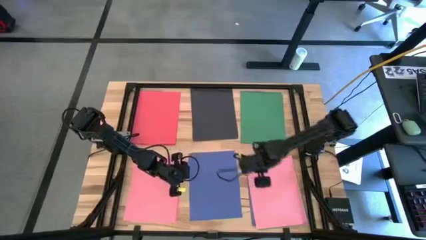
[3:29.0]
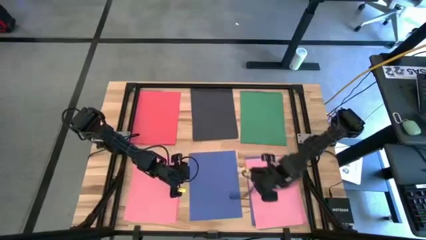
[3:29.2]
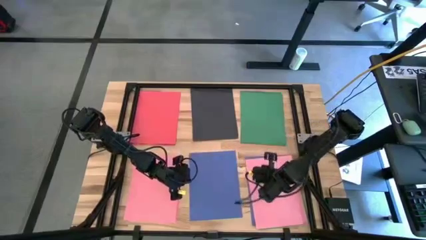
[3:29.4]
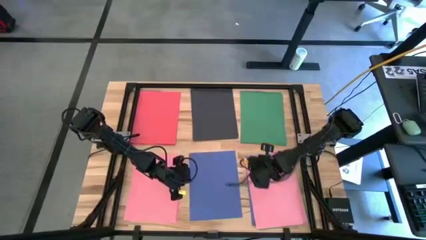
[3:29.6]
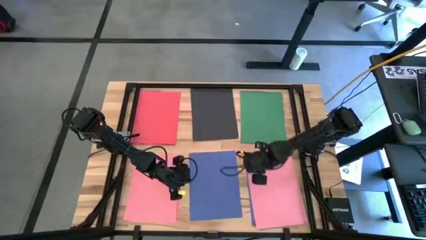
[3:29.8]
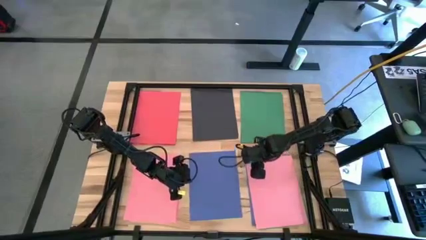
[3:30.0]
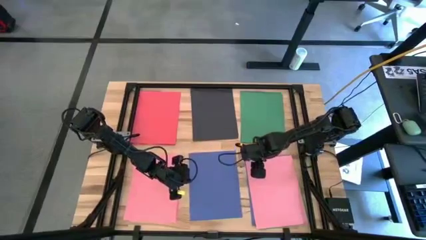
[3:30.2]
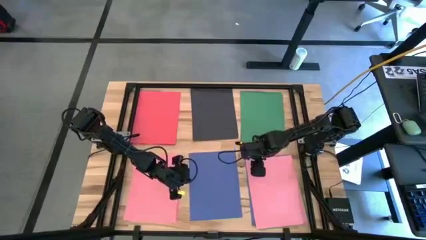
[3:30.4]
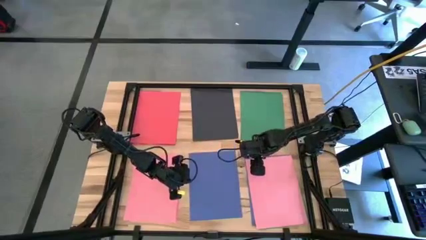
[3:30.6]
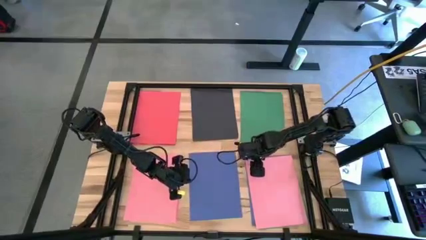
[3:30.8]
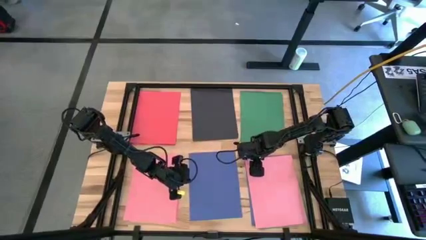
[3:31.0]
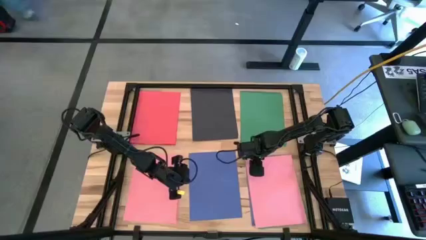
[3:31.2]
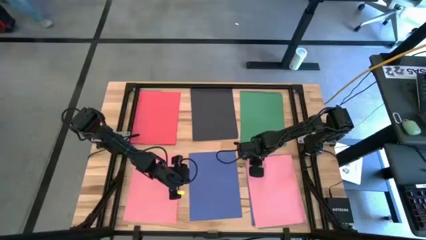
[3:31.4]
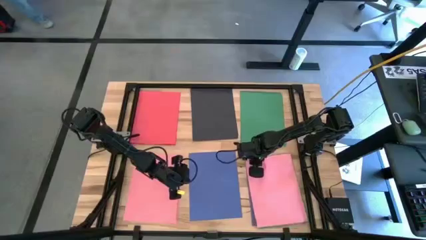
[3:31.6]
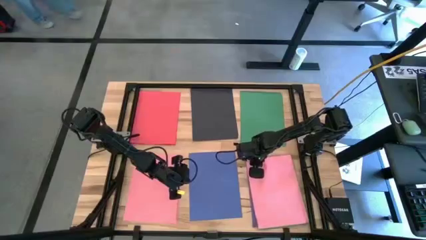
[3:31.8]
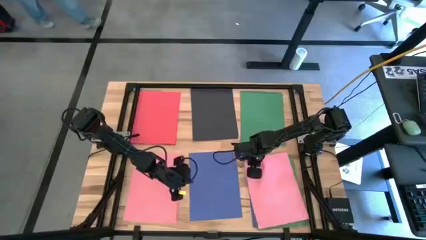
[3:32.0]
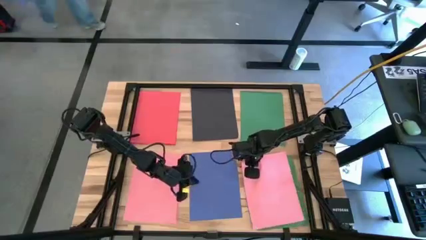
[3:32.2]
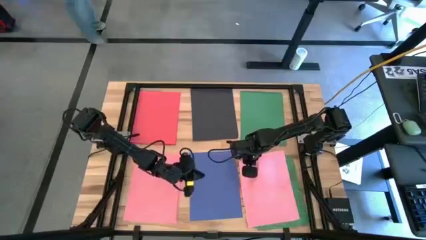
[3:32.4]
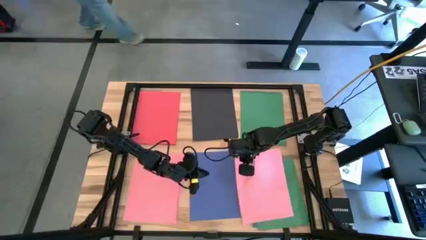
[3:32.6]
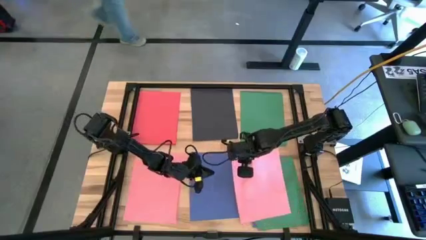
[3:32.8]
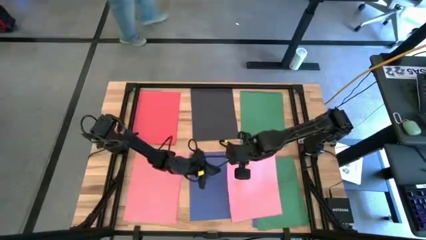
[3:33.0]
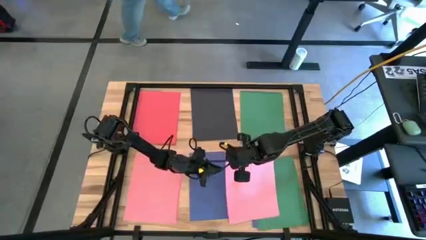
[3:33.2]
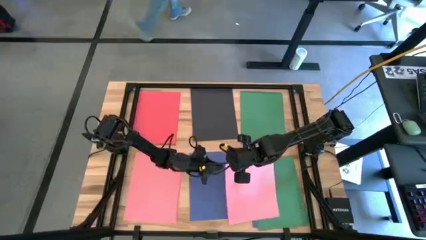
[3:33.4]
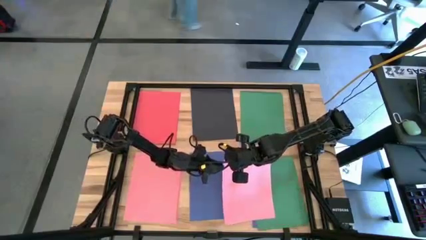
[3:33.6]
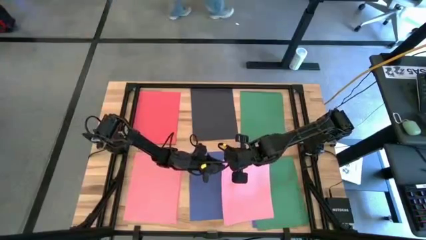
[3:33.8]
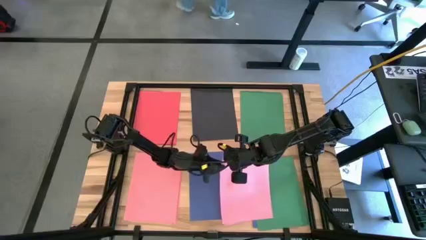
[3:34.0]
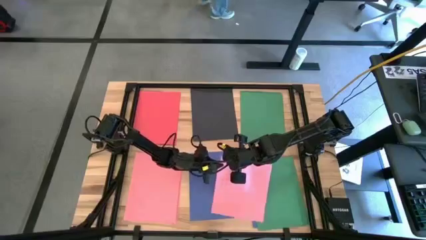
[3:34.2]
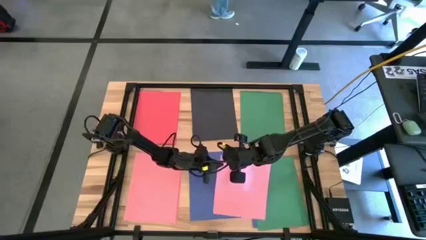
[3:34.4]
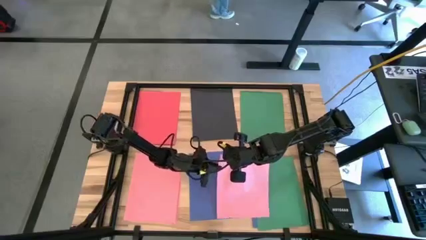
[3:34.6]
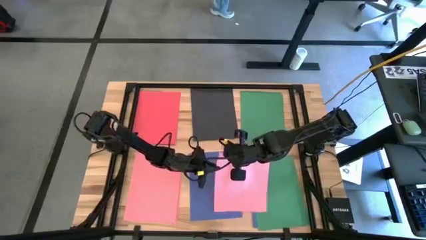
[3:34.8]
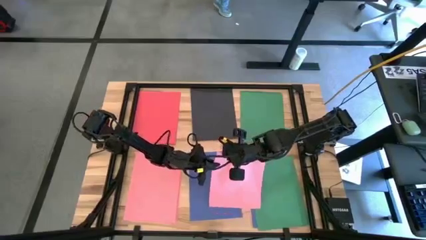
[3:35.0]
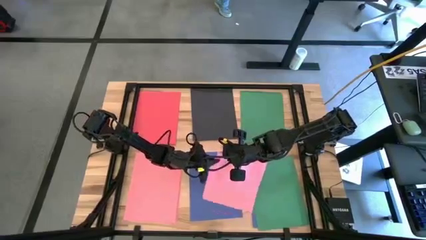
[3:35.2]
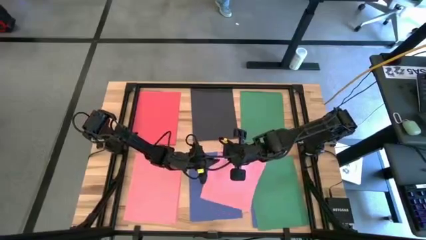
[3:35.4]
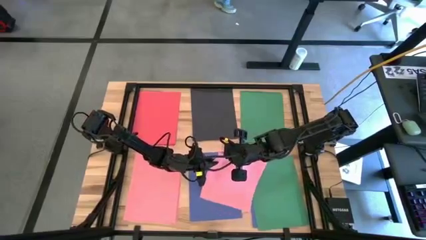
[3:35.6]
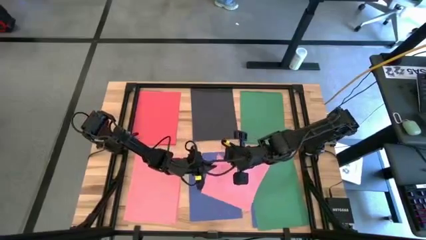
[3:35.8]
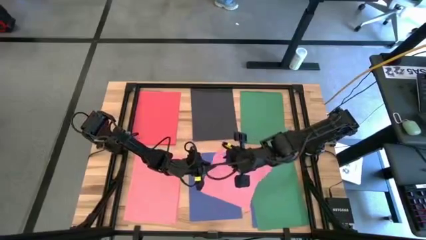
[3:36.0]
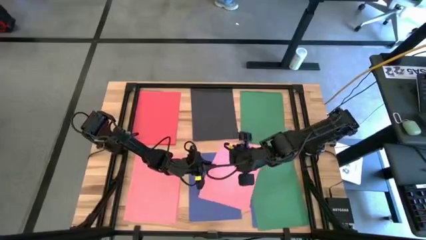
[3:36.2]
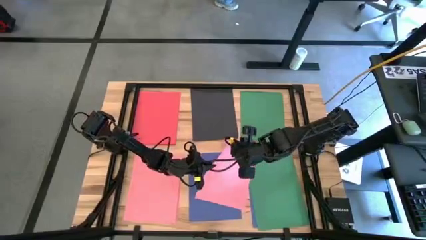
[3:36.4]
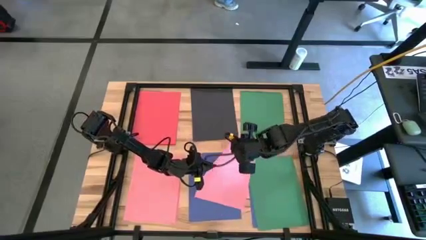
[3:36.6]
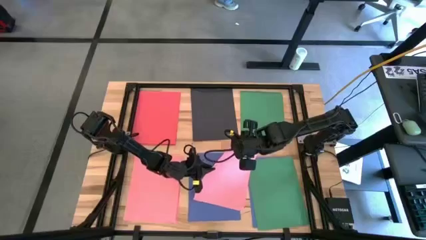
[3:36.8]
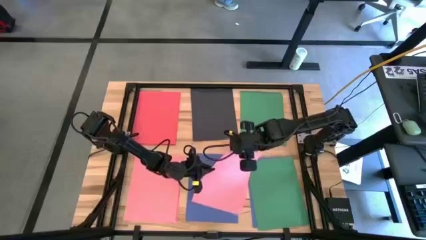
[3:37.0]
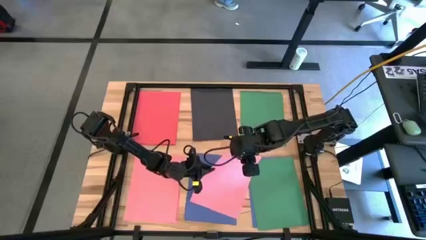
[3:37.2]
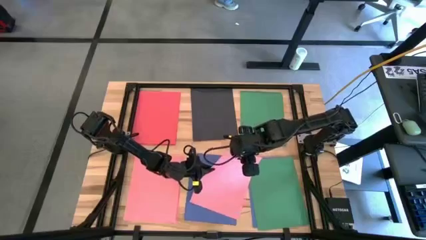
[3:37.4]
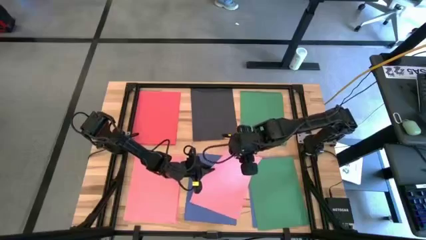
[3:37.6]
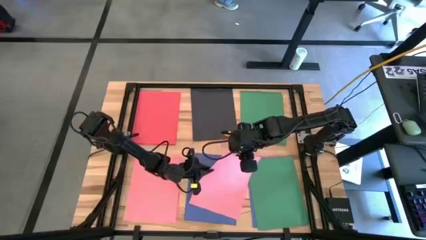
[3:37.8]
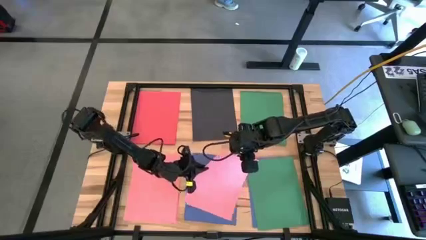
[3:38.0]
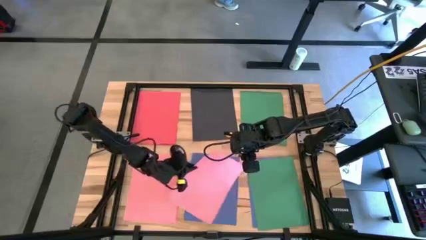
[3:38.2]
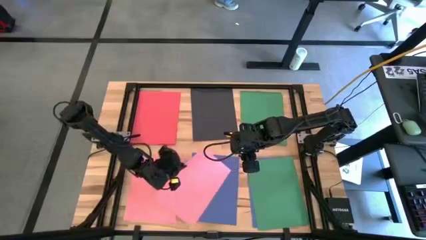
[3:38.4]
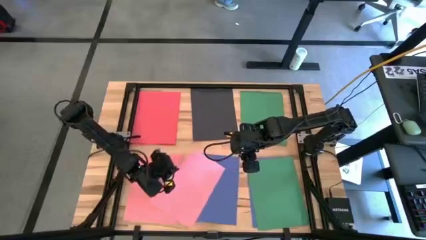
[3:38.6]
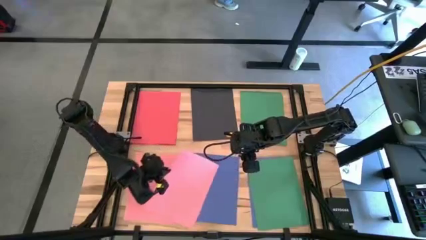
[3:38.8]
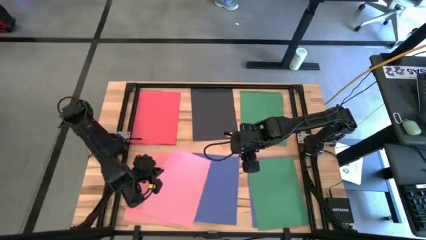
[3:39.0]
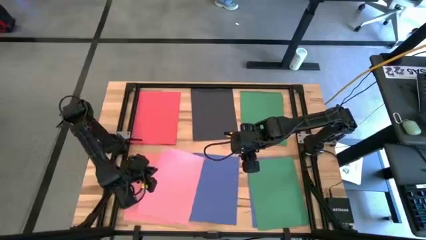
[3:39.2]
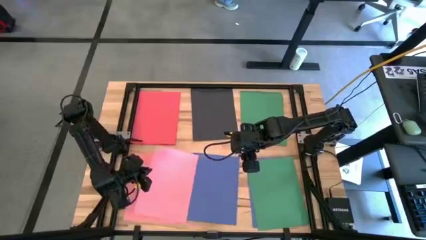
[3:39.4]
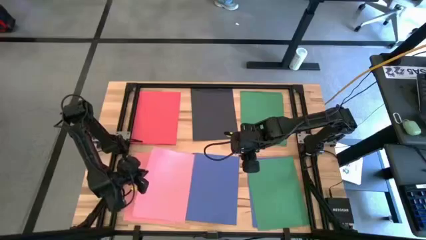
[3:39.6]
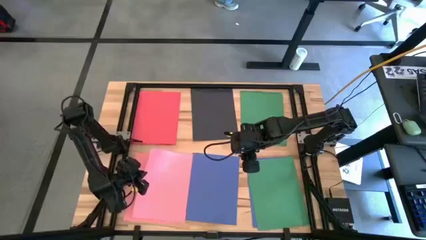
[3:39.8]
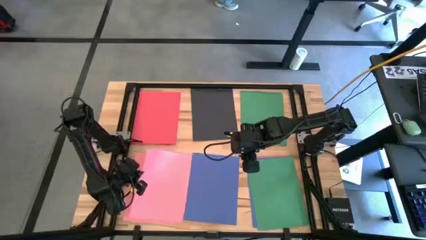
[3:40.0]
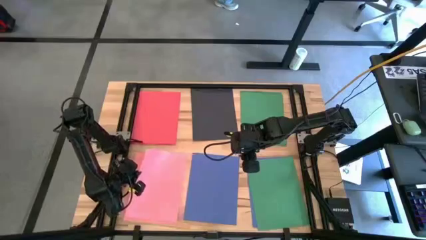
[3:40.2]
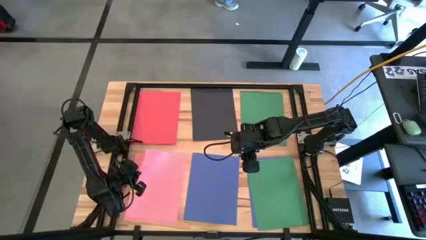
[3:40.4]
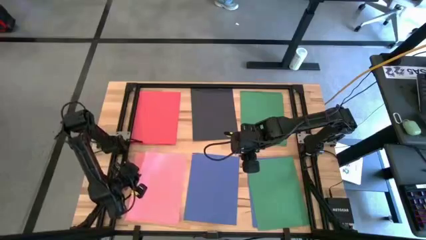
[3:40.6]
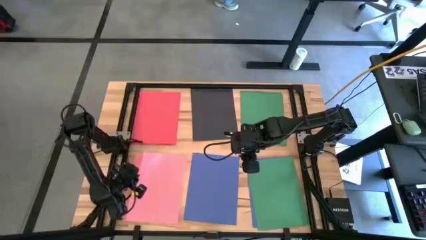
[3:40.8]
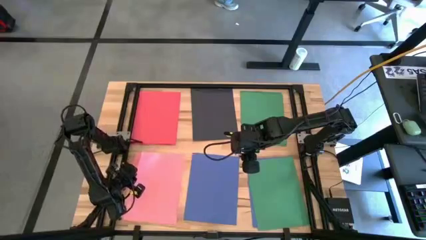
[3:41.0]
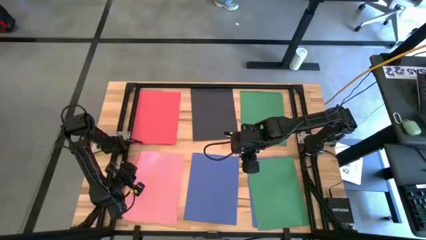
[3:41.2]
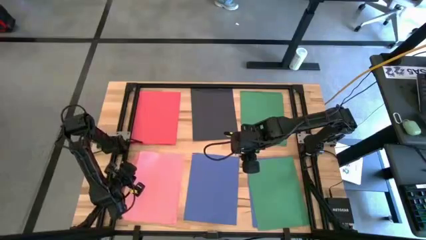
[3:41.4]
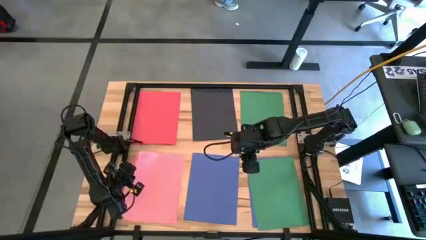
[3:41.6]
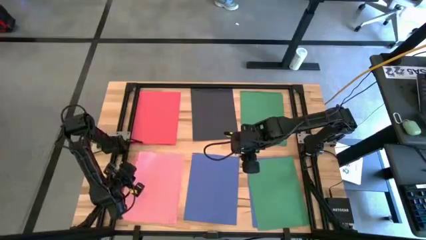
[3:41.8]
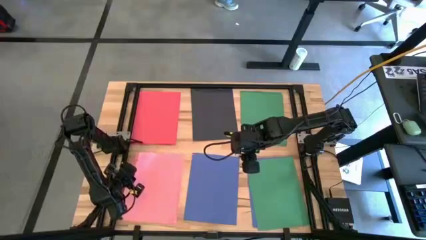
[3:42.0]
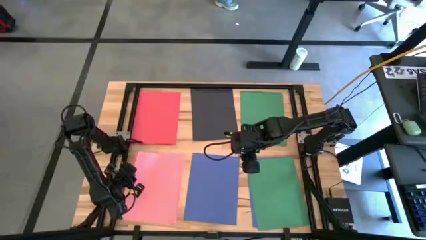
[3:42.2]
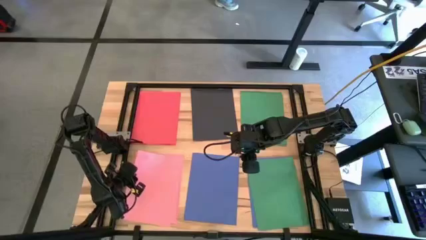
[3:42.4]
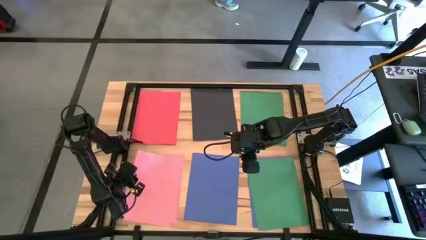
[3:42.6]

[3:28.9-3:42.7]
Task: Organize paper
Stack the pink paper on the stacked pink paper
